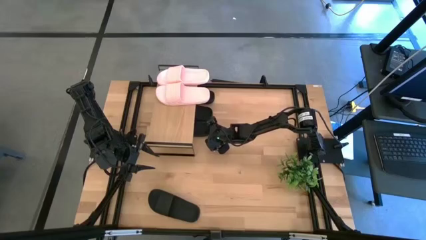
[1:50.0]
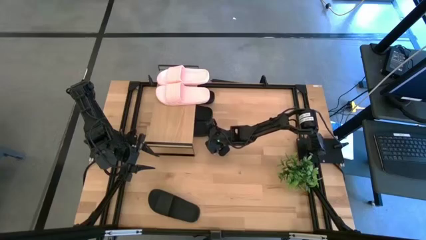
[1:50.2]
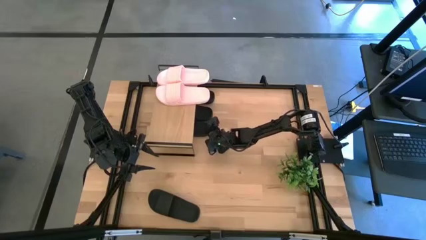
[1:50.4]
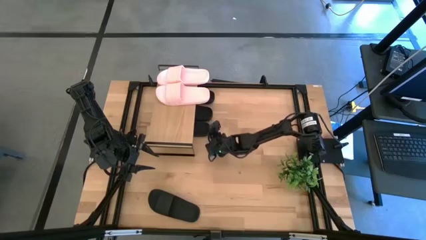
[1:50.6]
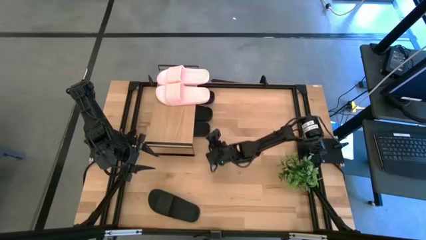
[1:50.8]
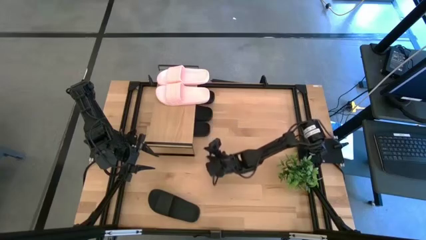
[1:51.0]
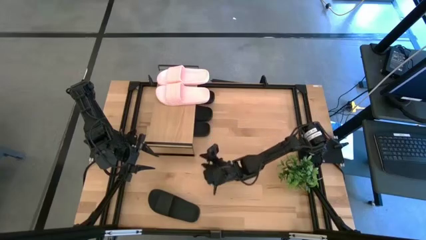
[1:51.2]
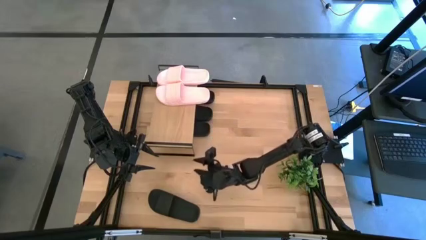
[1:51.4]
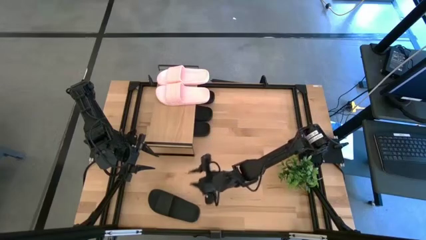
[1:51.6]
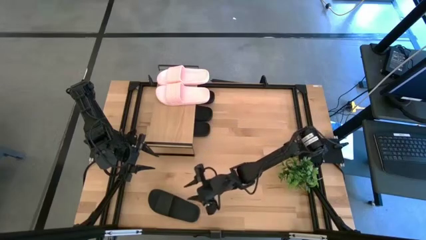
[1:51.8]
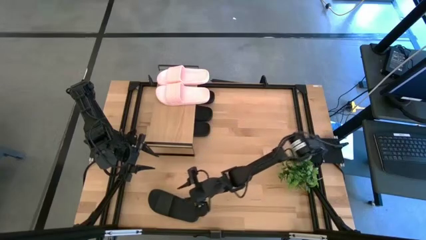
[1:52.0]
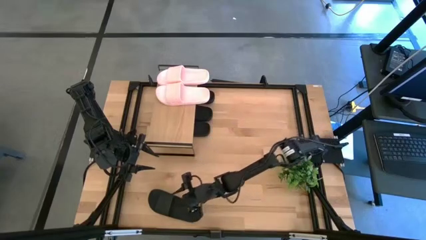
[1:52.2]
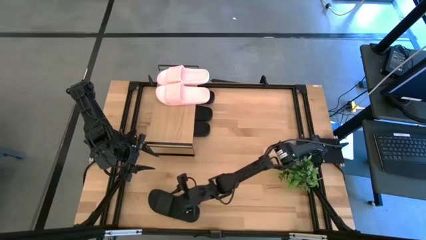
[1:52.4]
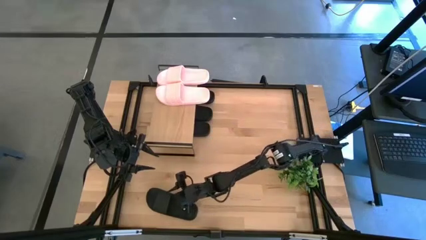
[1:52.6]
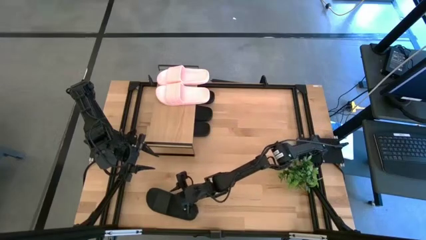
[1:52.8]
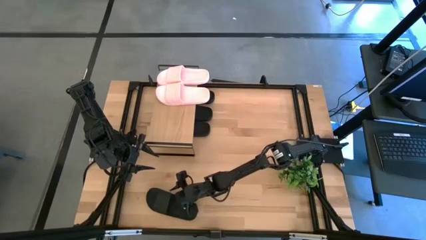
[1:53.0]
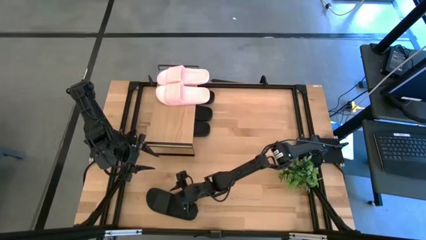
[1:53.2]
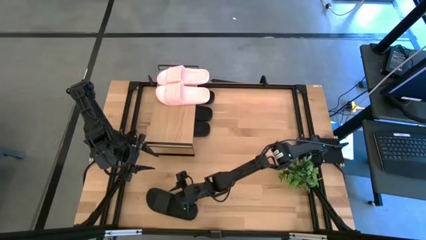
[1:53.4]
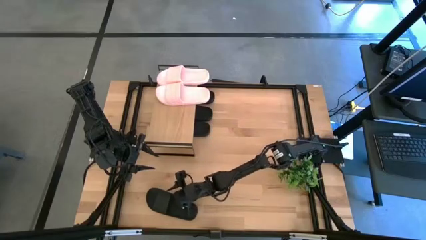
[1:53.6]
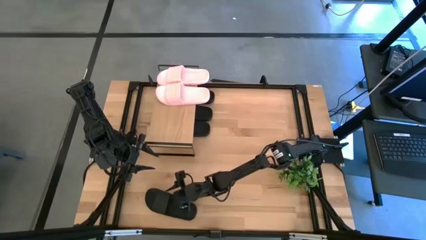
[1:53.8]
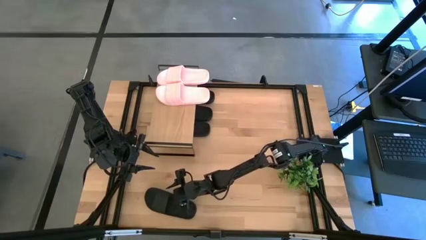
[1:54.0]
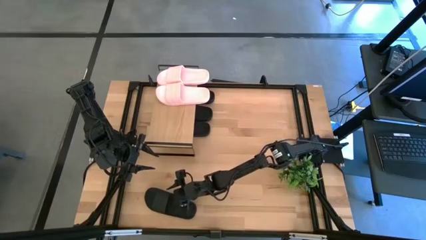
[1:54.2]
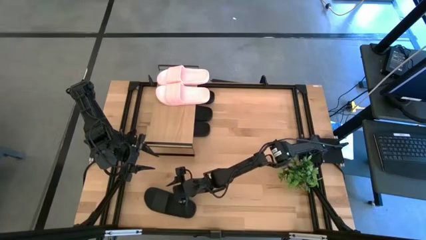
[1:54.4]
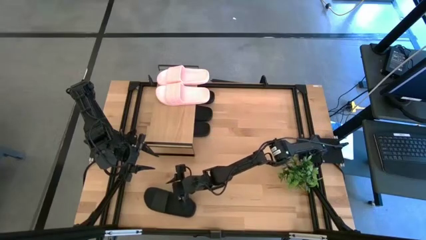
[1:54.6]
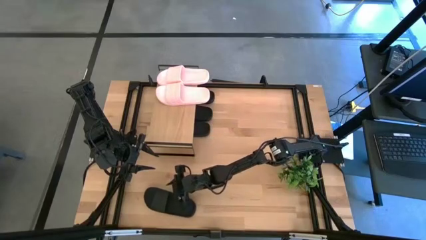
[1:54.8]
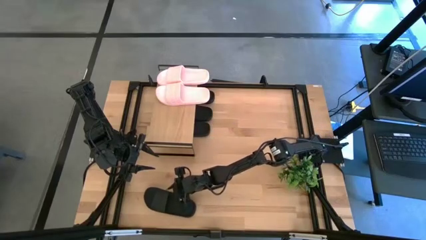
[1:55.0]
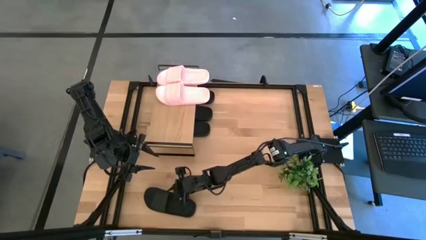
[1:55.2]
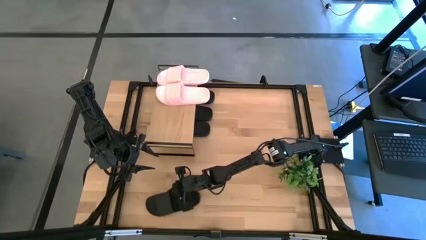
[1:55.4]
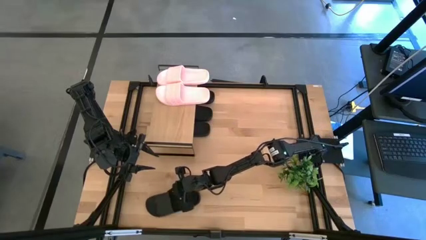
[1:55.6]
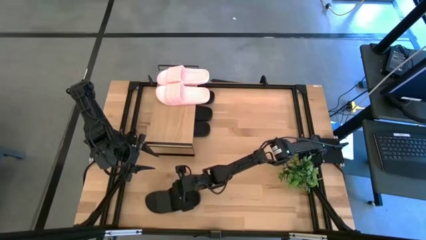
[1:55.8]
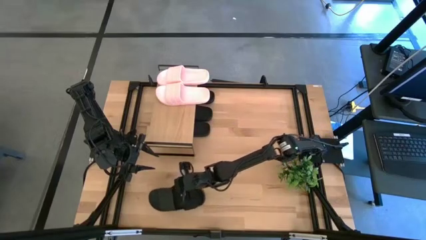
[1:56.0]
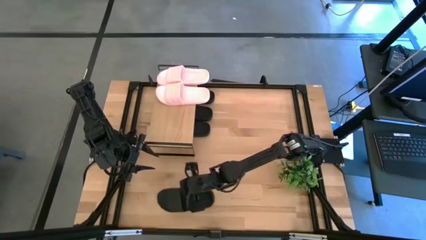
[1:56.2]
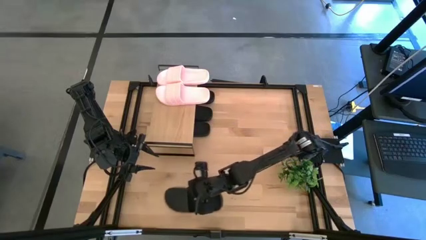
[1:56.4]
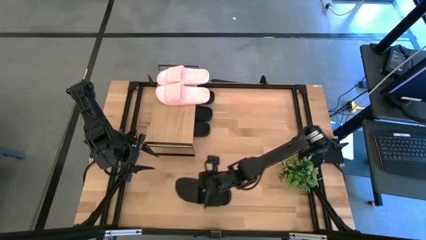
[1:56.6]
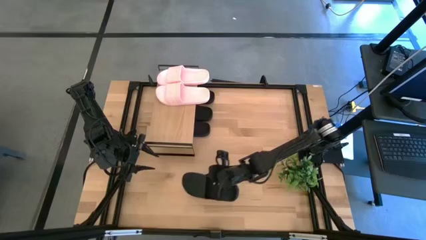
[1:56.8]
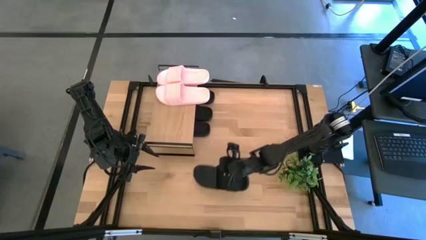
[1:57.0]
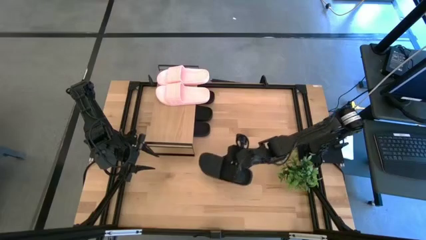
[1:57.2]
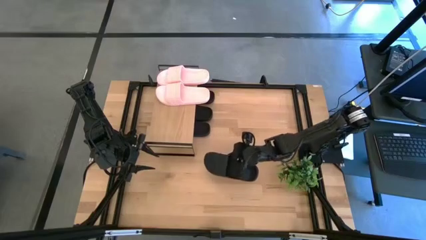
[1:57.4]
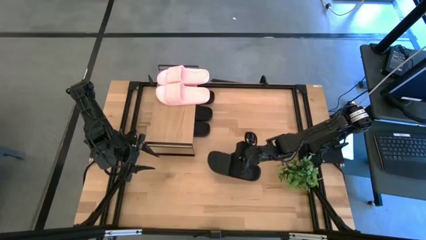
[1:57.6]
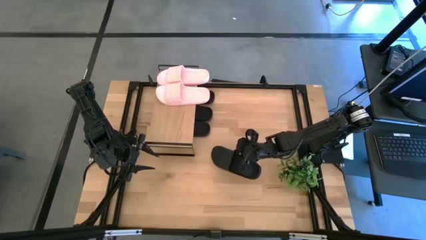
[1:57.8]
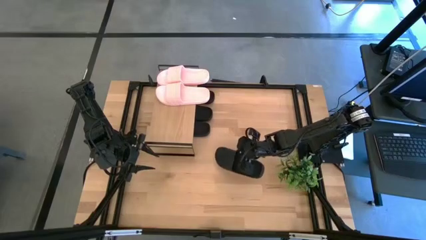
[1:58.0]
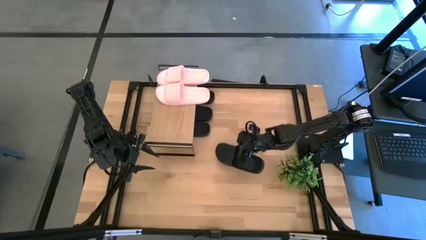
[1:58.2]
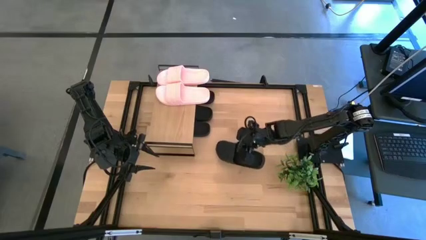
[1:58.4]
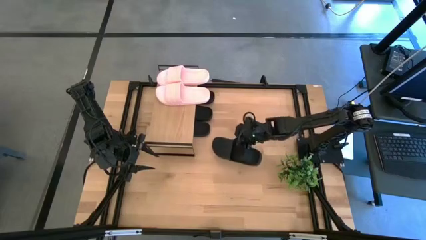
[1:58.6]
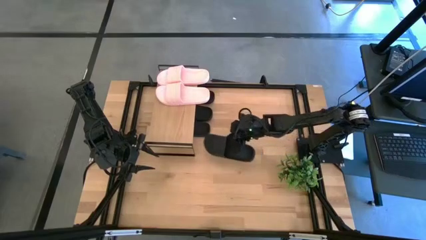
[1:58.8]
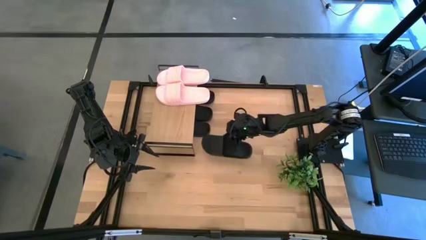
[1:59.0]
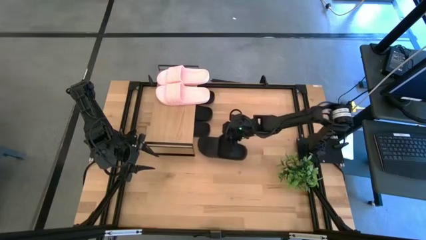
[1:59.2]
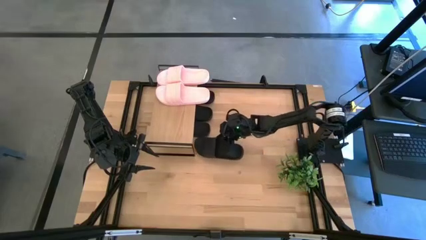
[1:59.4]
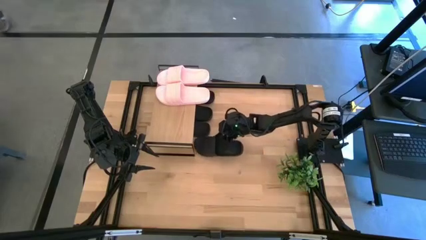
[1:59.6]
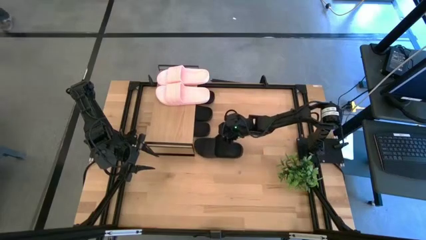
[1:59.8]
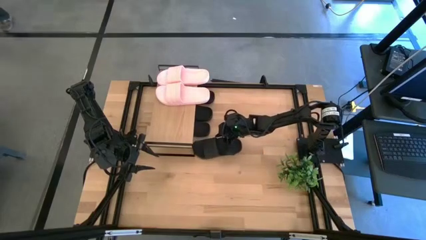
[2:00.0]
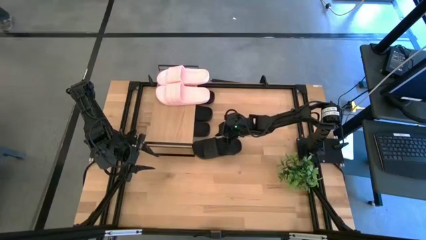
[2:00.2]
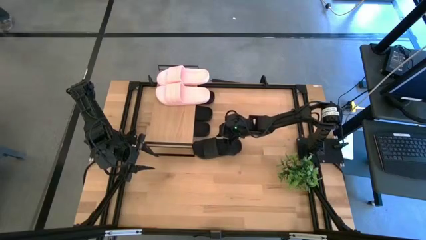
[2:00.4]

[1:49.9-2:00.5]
Task: Pick and place slides into the shelf
Put the black slide under the shelf

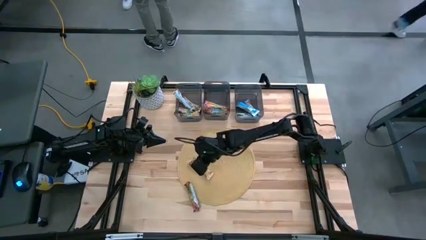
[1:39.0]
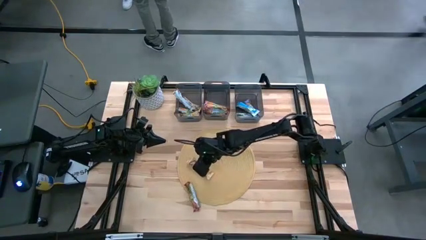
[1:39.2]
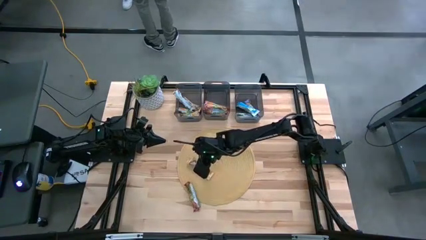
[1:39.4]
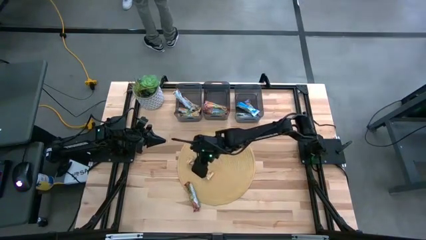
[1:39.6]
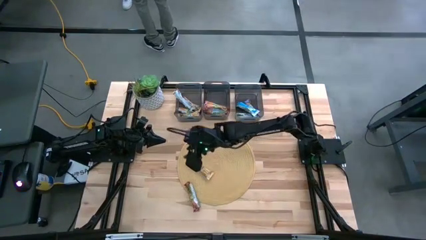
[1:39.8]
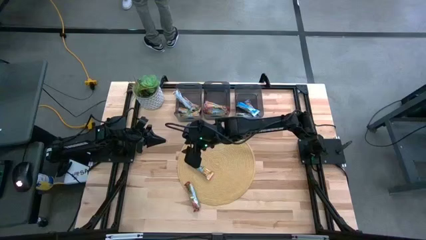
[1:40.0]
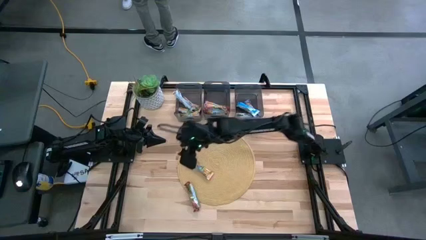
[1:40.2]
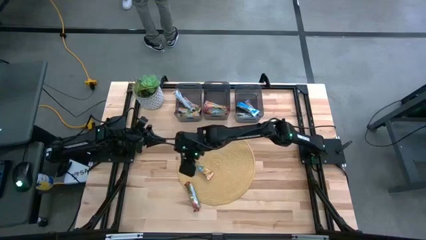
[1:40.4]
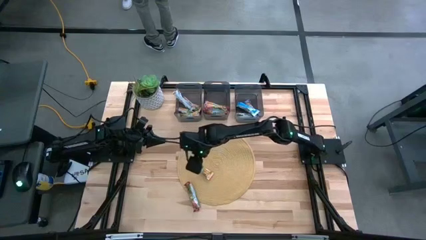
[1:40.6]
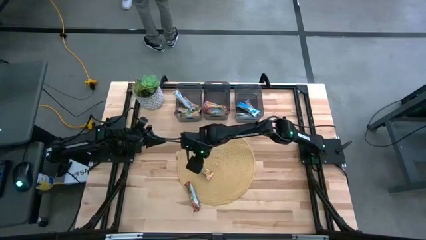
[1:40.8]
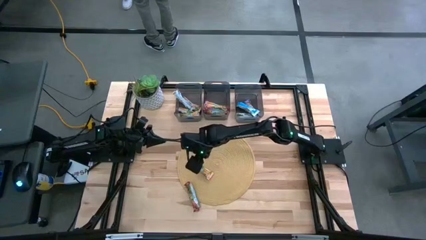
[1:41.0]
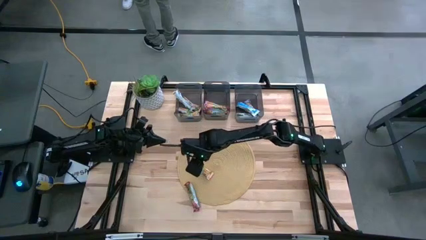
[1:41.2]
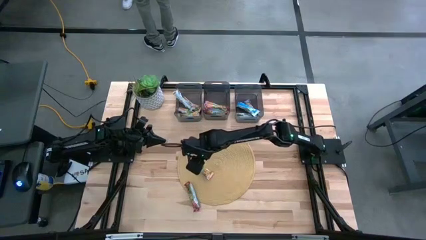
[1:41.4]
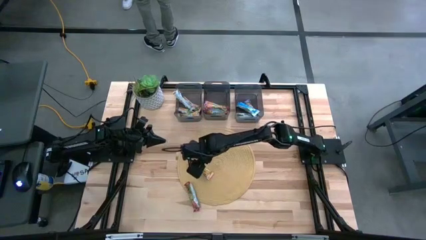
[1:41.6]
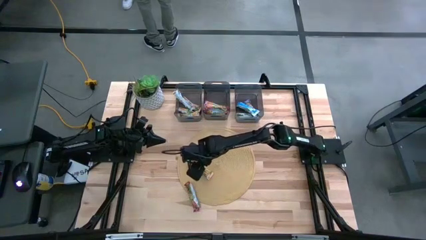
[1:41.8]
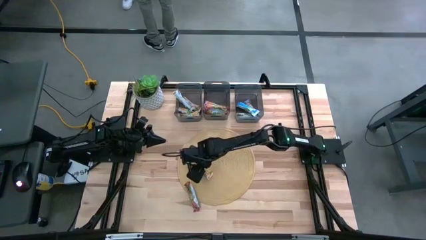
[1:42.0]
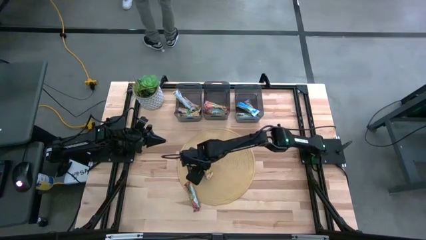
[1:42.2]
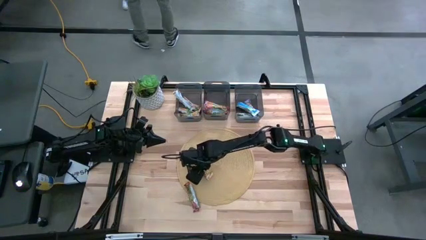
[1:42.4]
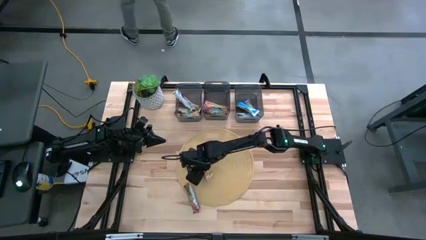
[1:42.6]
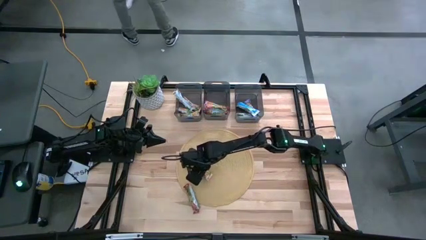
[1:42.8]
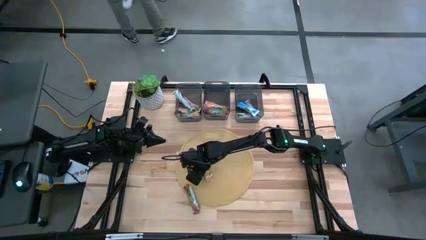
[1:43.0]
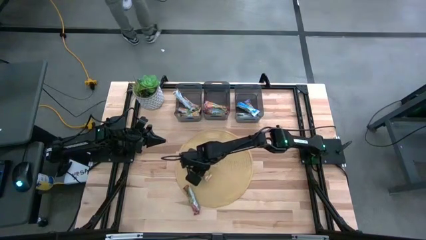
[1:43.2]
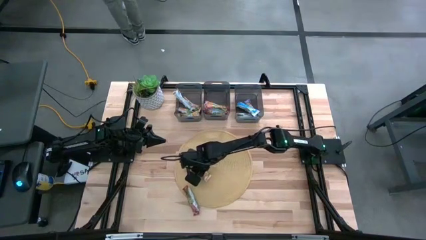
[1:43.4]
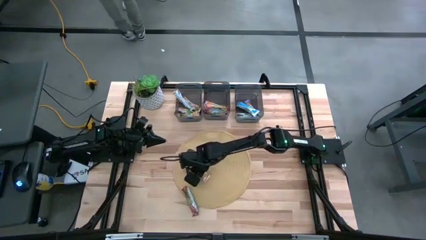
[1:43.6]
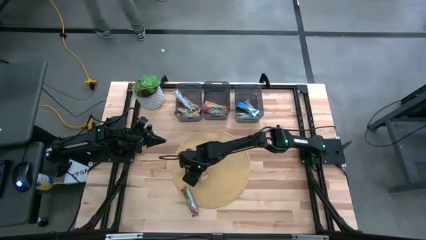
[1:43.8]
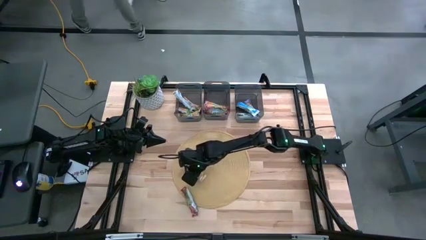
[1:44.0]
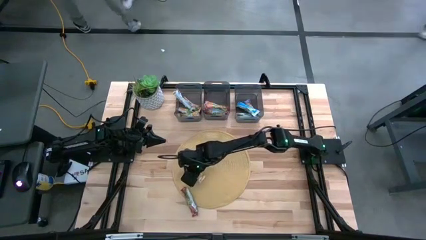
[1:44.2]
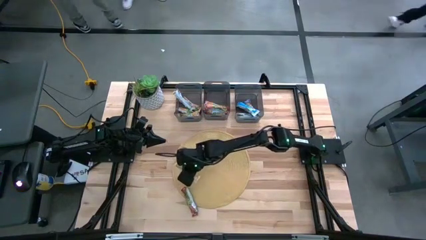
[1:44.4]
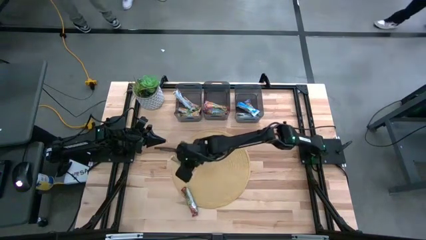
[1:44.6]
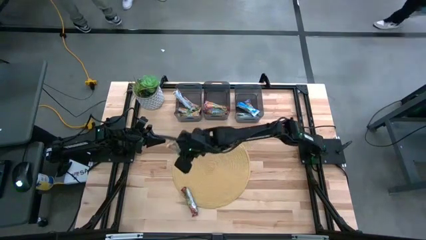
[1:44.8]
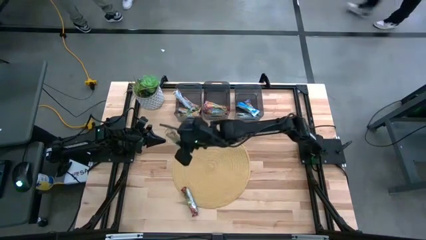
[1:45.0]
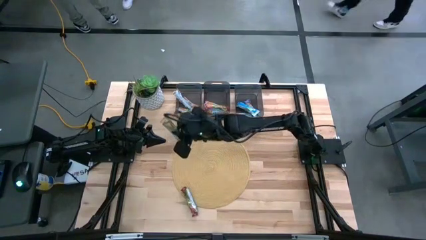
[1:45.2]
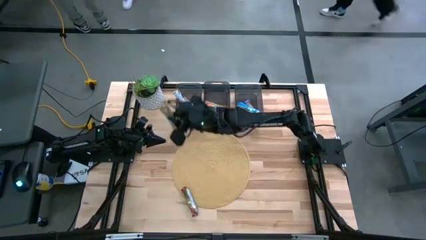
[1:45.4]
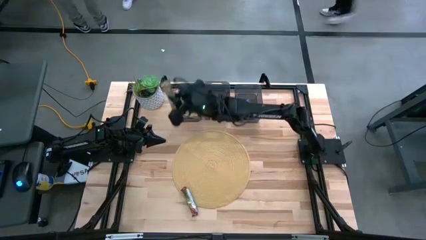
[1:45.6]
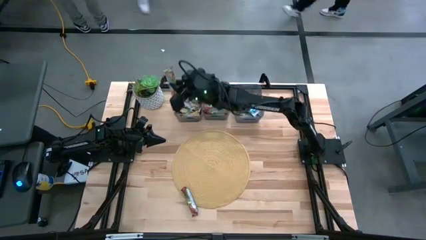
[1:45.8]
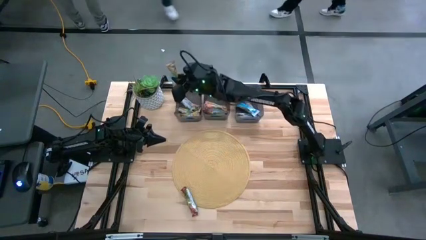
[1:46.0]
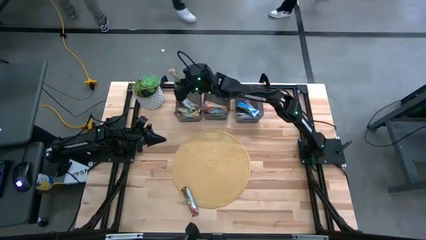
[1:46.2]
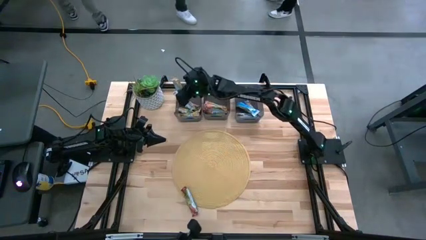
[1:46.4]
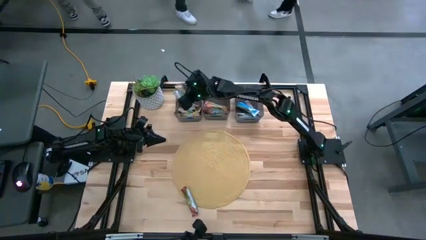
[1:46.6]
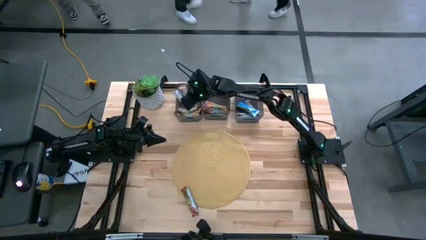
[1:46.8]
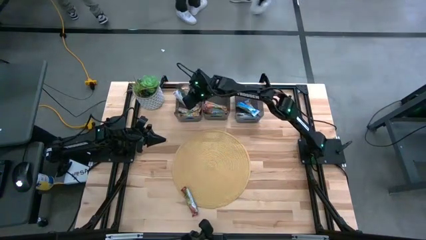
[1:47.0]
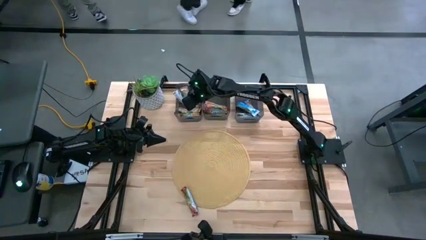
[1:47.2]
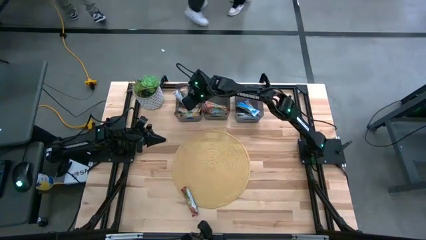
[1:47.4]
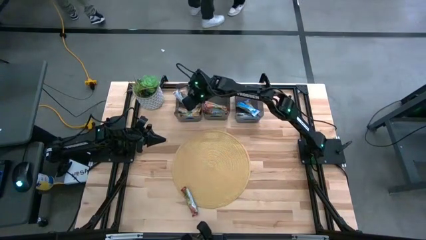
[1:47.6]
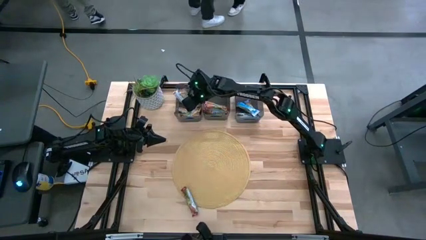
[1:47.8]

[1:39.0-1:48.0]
Task: Pick and place Granola Bars by type
Put the yellow granola bar into the left black bin
